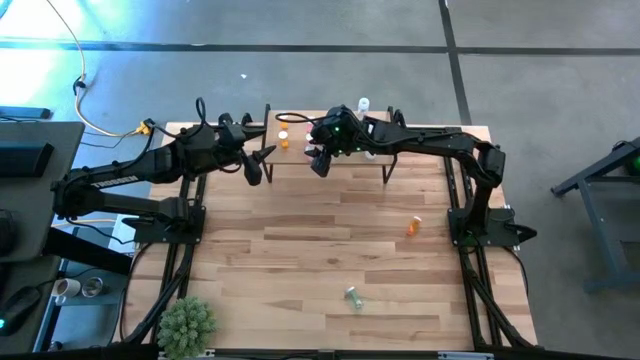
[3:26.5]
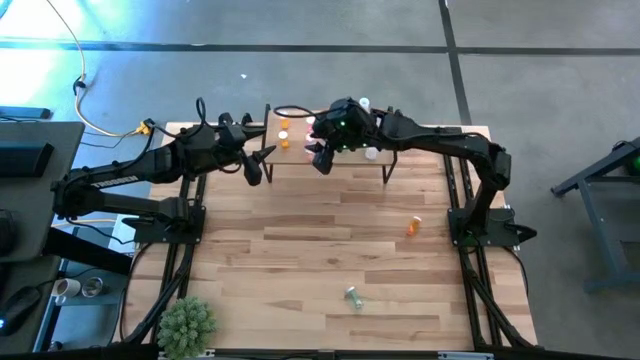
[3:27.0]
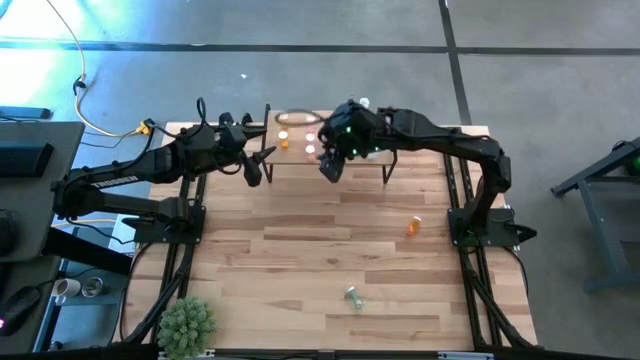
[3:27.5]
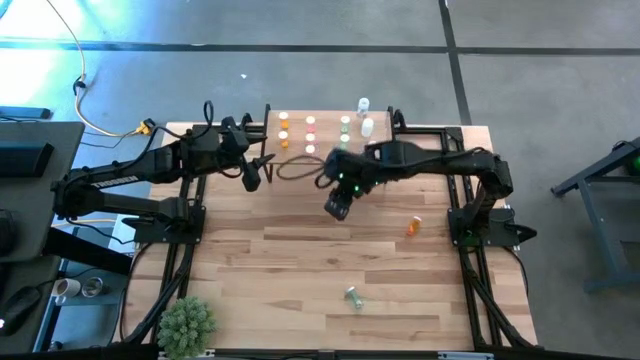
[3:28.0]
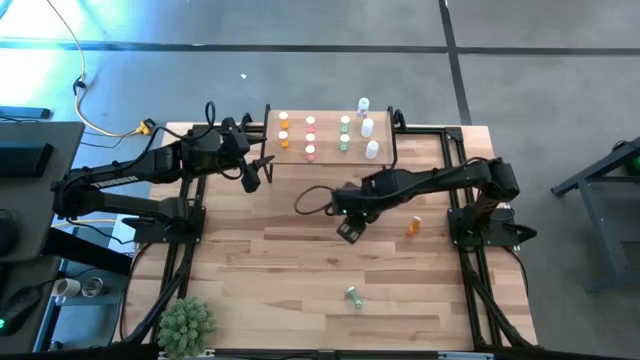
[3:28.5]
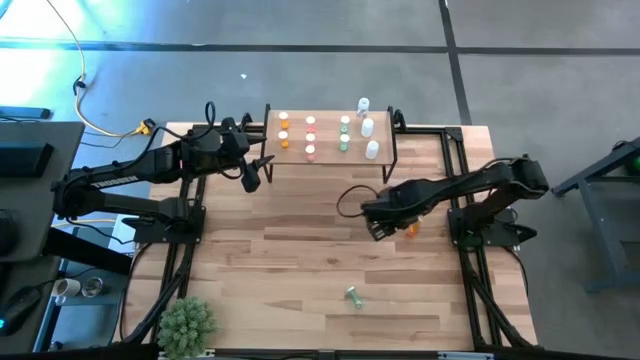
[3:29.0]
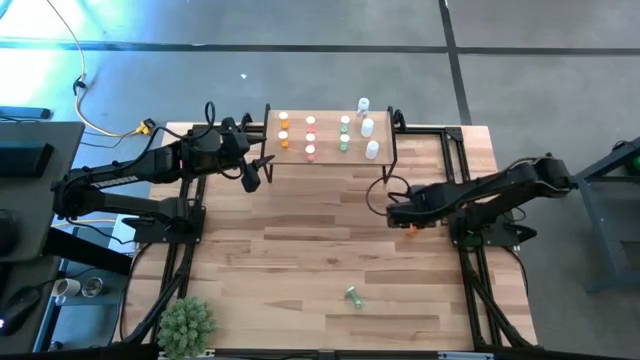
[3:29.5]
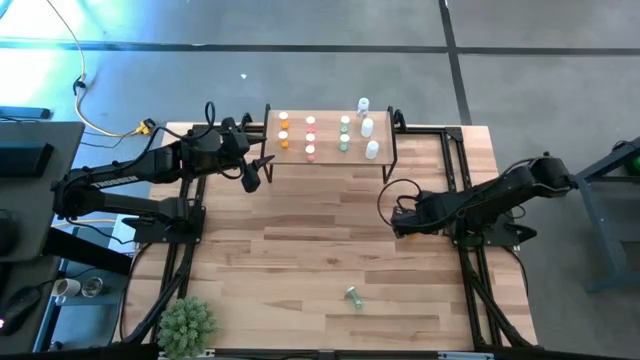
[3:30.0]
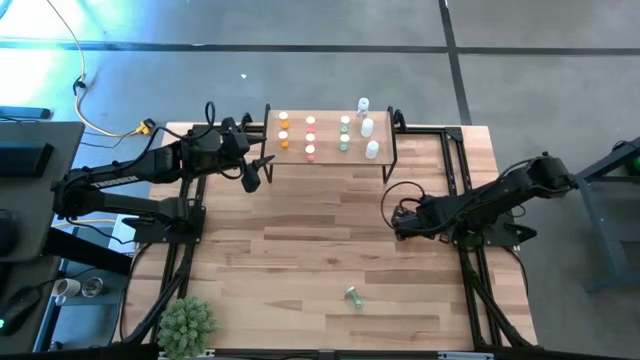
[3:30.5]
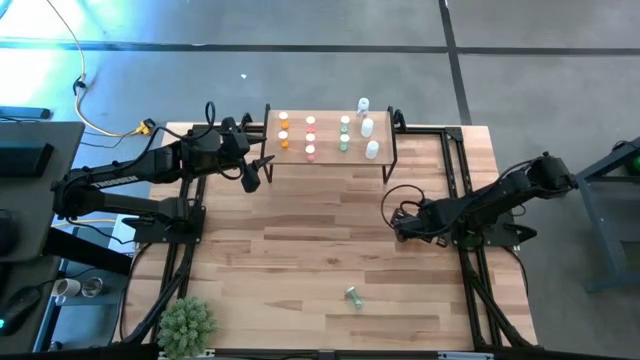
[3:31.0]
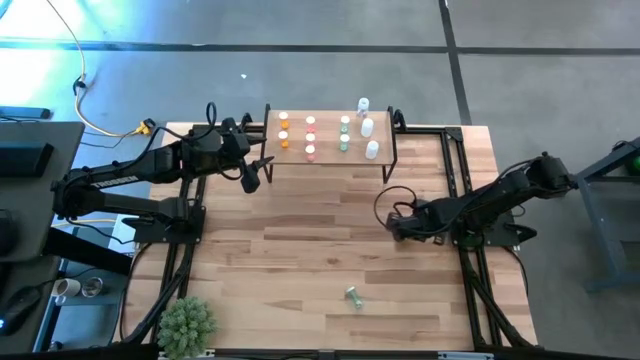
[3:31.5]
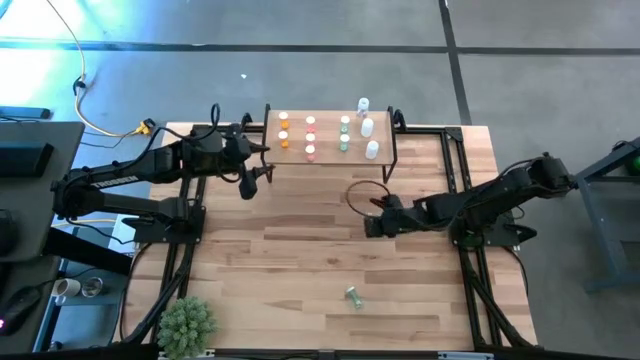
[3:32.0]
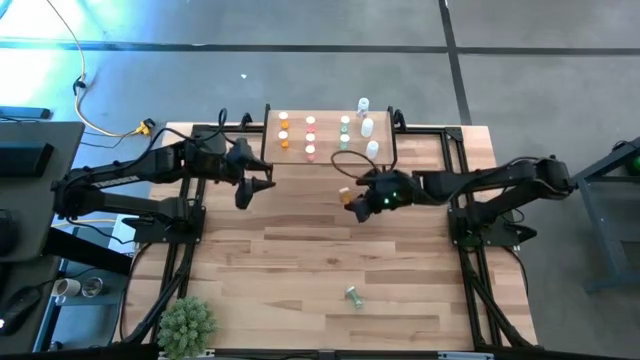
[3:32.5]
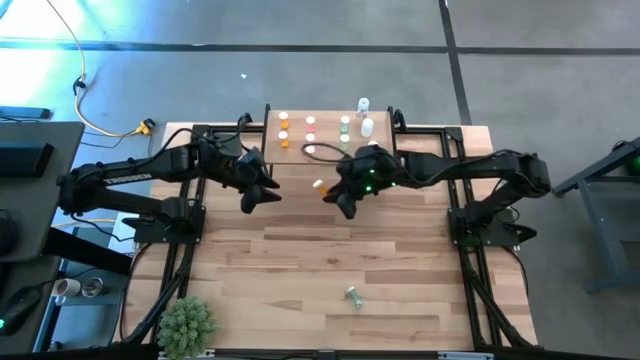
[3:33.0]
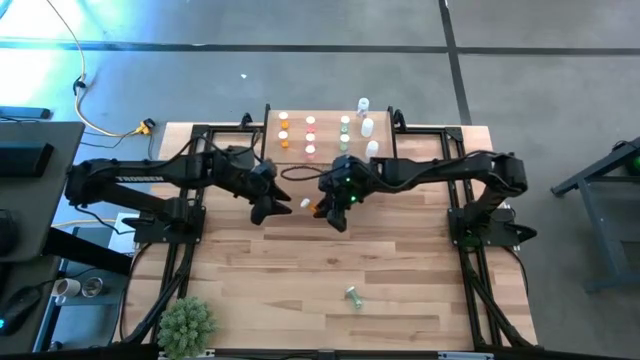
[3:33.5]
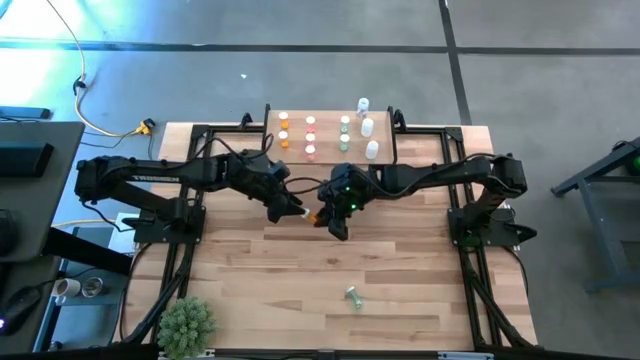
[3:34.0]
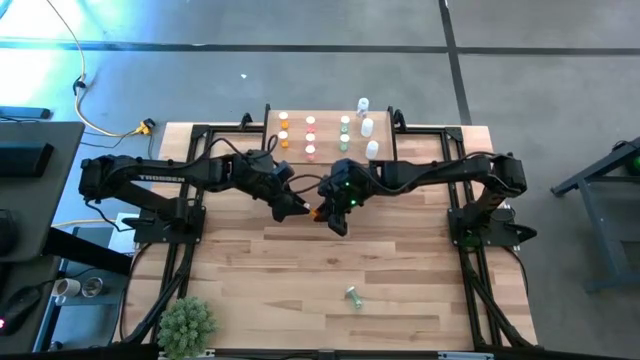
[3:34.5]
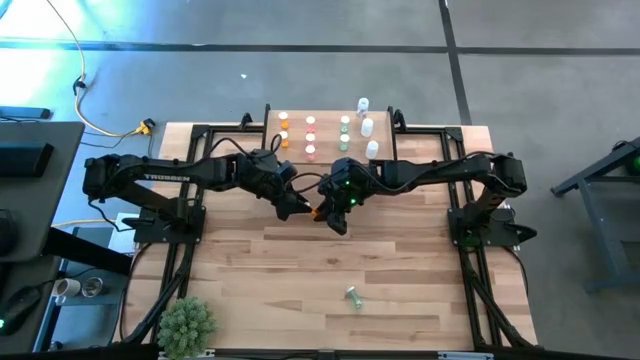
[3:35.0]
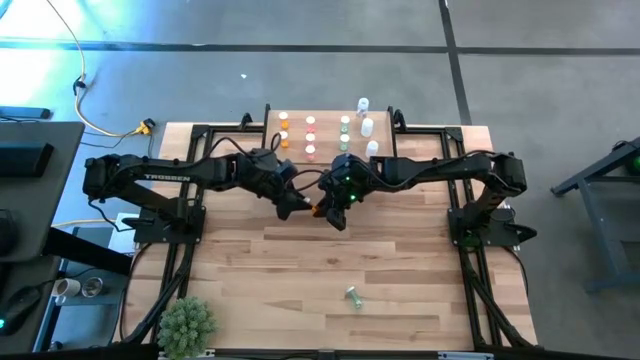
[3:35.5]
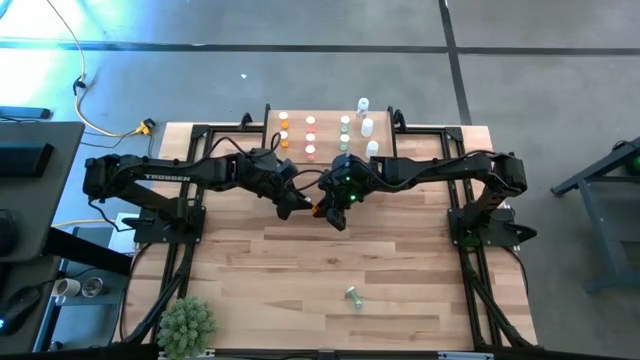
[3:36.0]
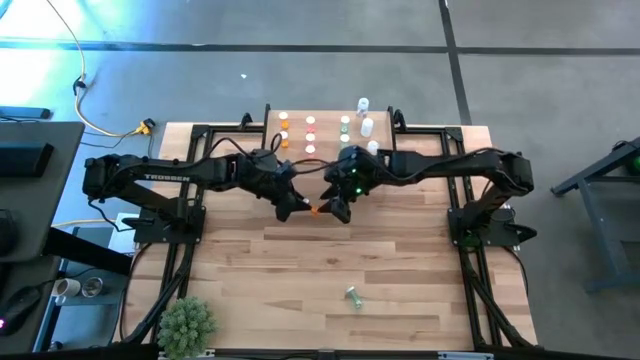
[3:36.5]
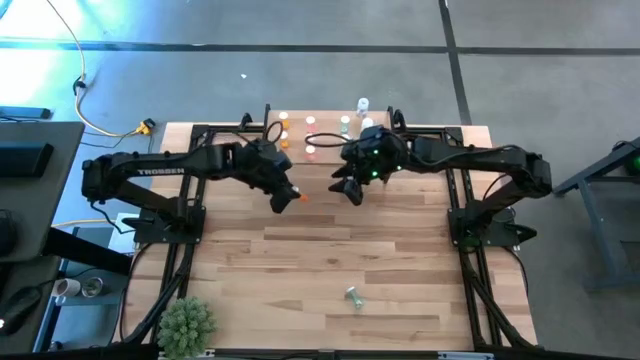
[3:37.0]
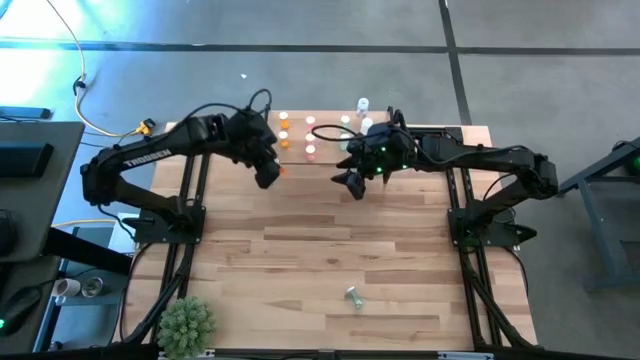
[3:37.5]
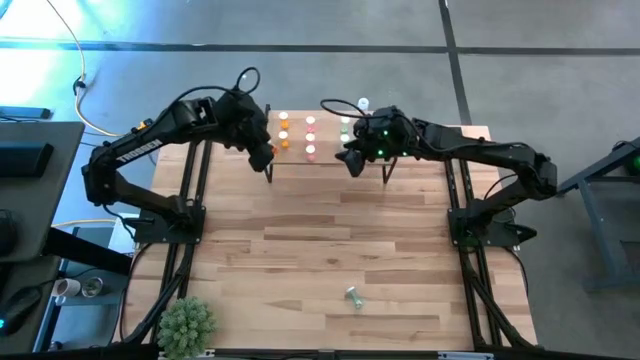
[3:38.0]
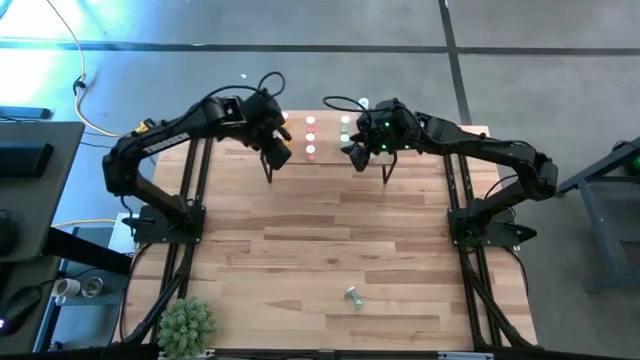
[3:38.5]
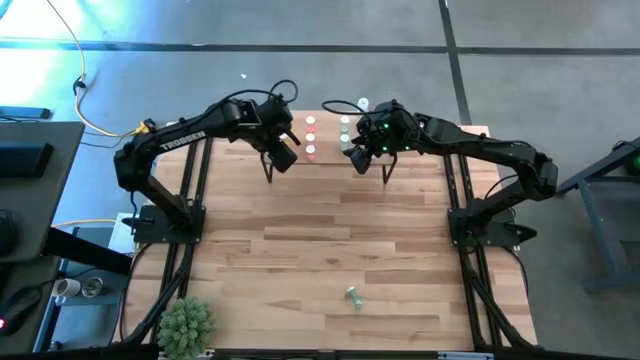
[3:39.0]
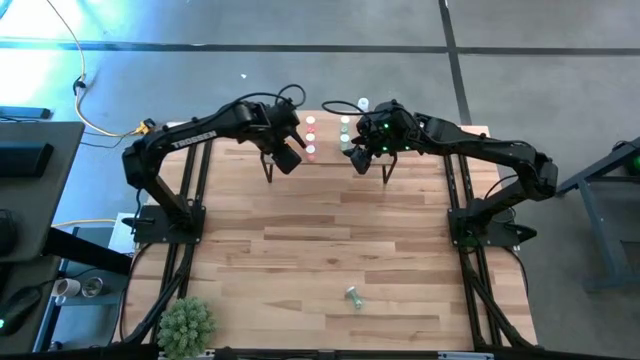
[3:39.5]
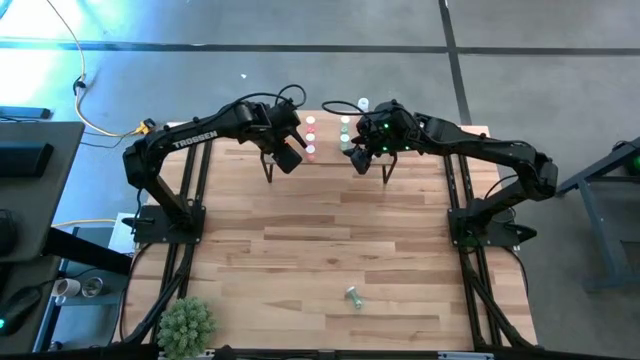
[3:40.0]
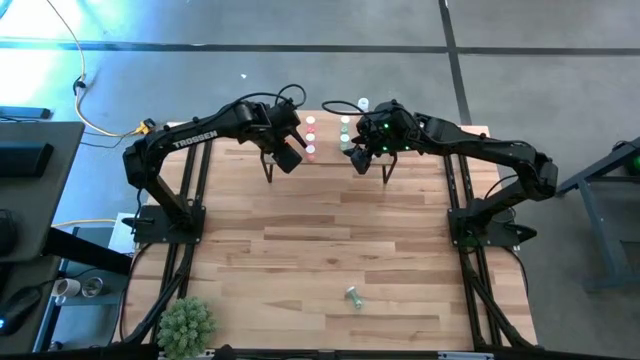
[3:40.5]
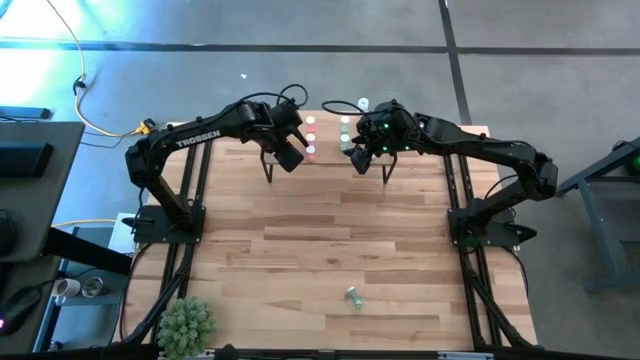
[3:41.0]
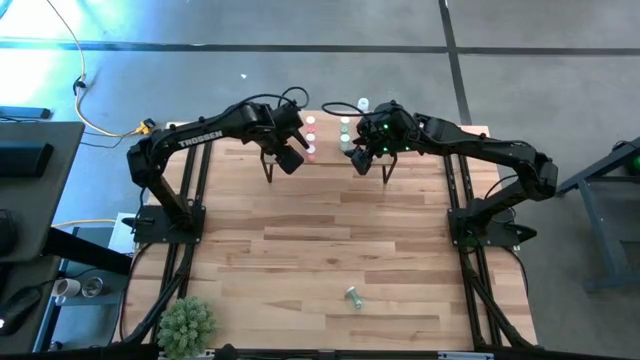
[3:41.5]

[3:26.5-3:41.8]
Task: Pick and place medicine bottles onto shelf by color
Put the orange pill bottle on the shelf aligned with the orange pill bottle

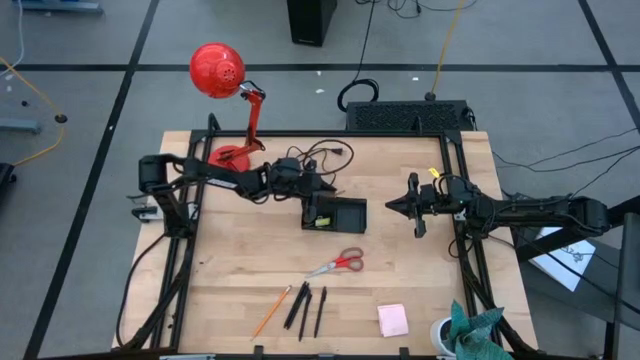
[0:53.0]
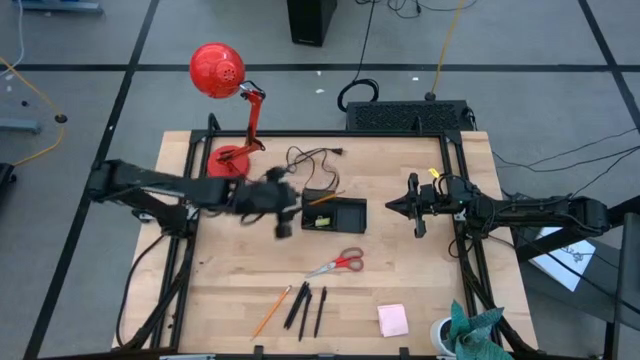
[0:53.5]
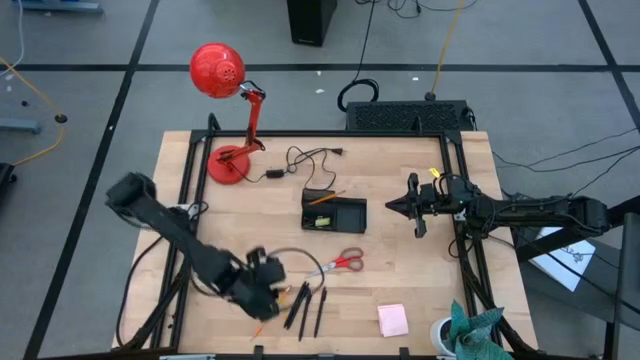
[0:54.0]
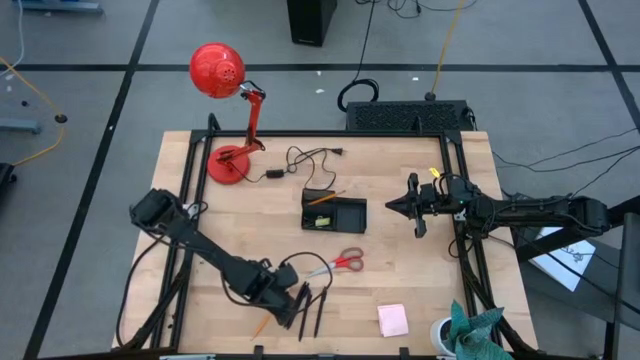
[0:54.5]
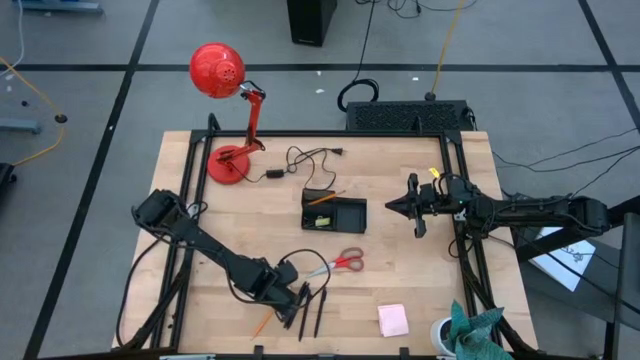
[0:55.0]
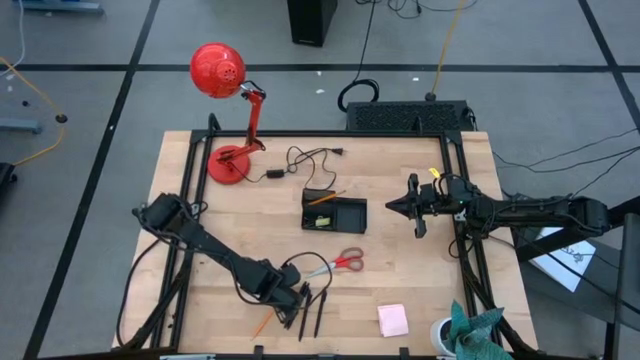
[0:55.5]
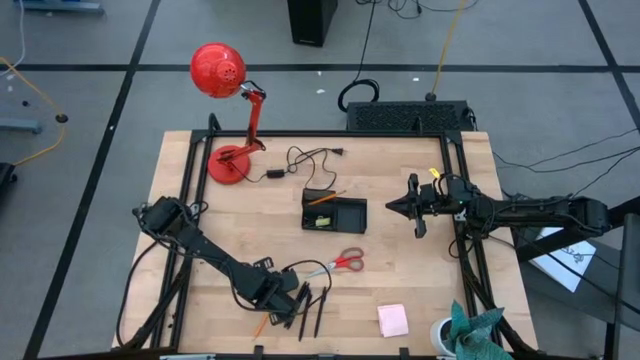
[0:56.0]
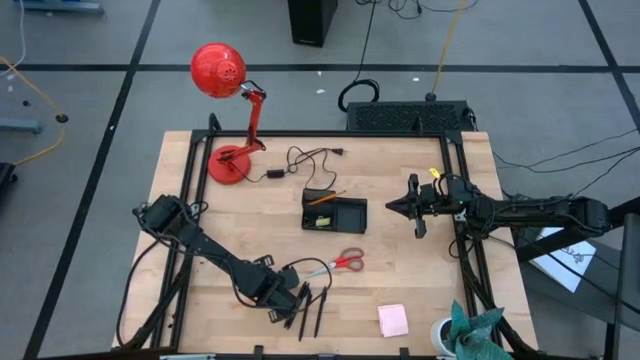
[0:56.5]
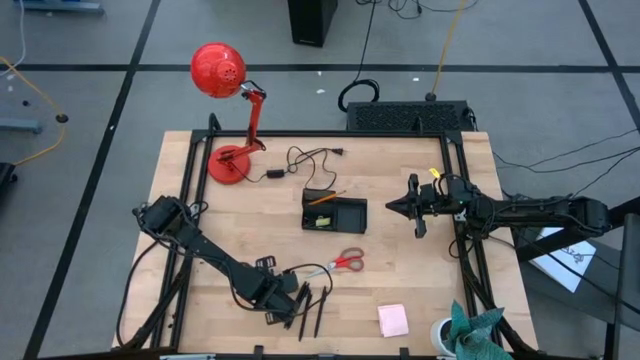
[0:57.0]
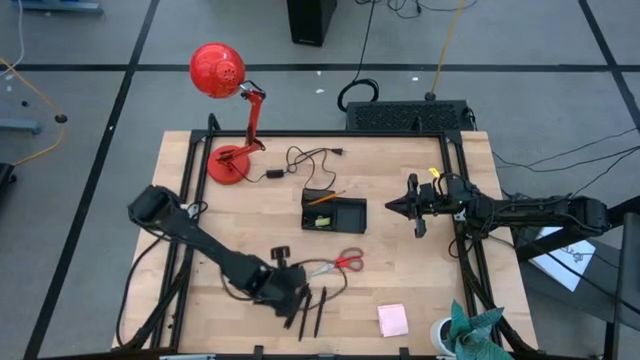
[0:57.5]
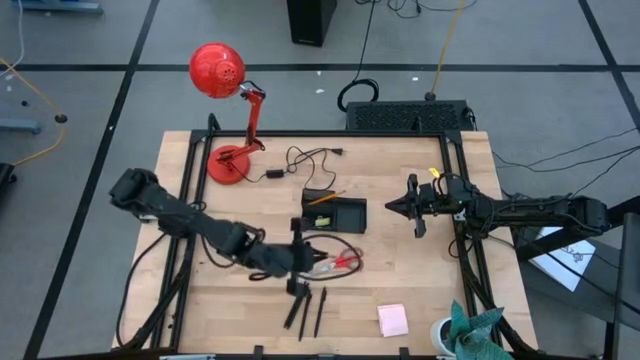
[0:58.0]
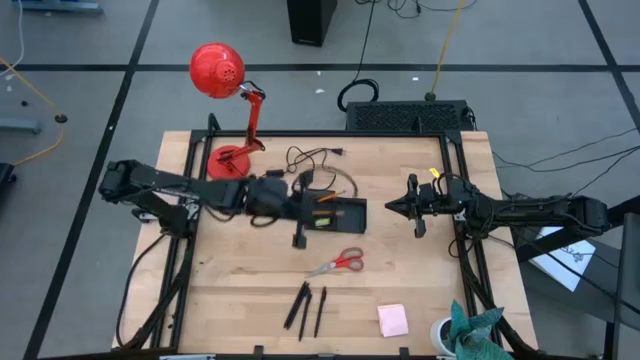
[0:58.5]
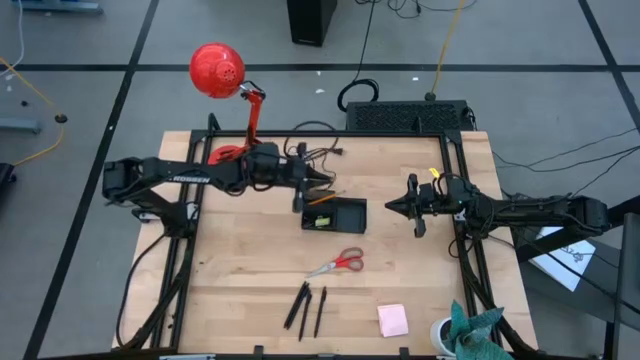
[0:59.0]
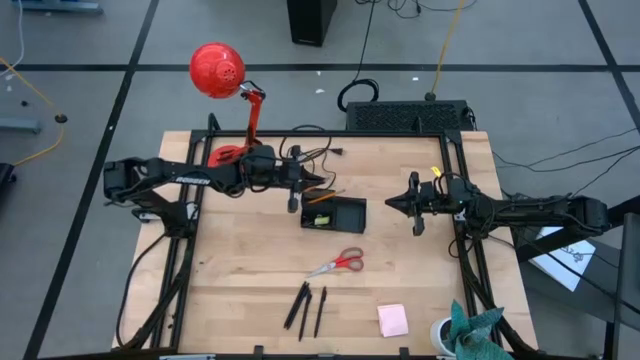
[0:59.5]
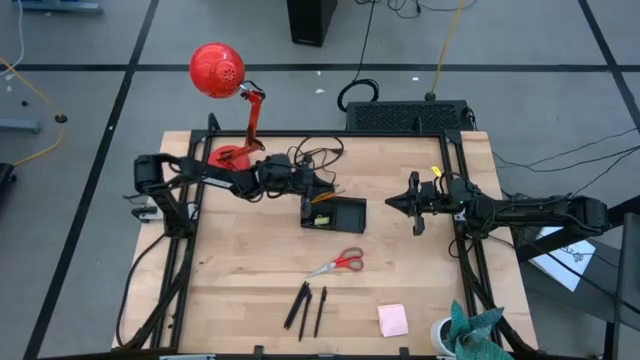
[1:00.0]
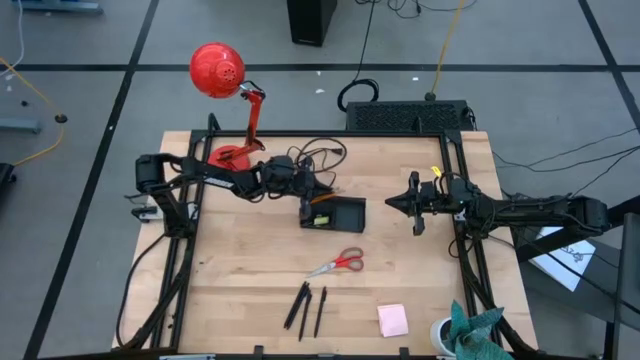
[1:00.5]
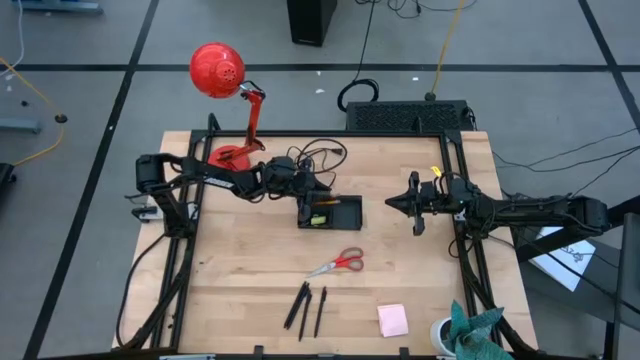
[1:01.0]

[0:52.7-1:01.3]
Task: Pick and place office supplies into organizer
Put the orange pencil into the black desk organizer
